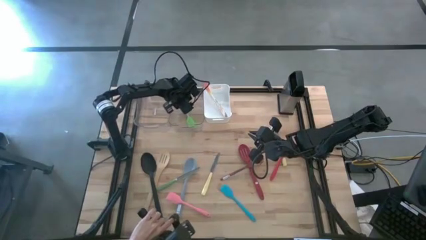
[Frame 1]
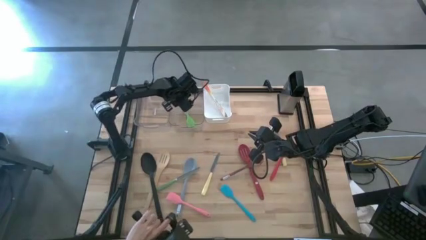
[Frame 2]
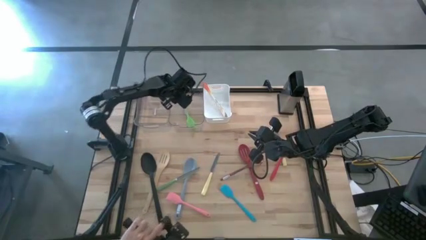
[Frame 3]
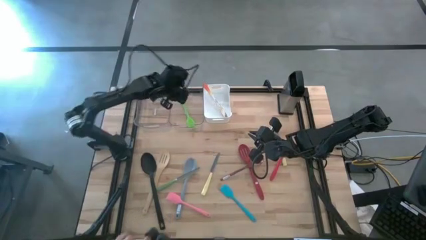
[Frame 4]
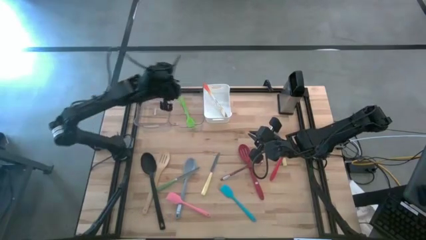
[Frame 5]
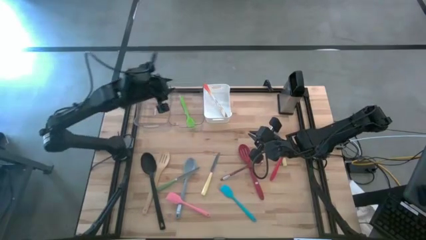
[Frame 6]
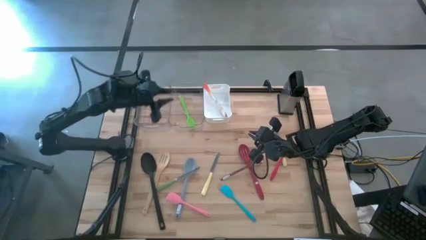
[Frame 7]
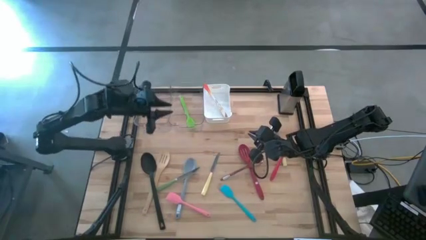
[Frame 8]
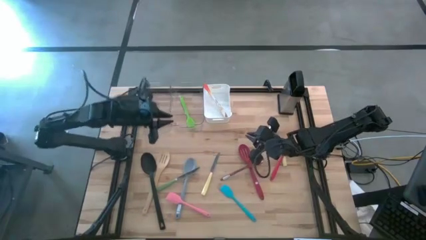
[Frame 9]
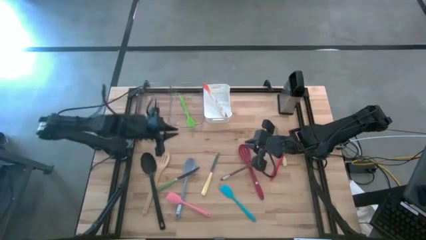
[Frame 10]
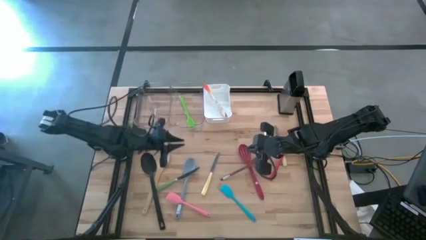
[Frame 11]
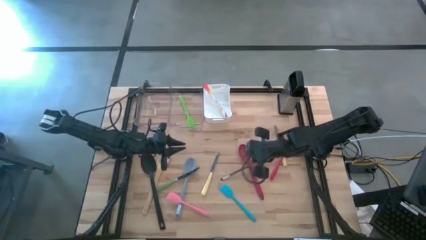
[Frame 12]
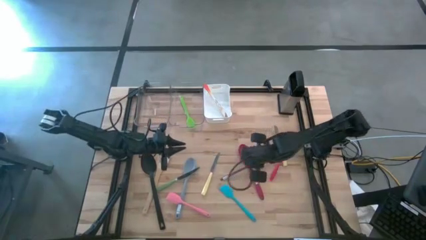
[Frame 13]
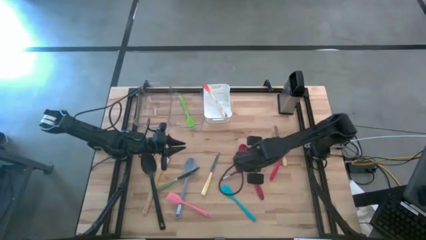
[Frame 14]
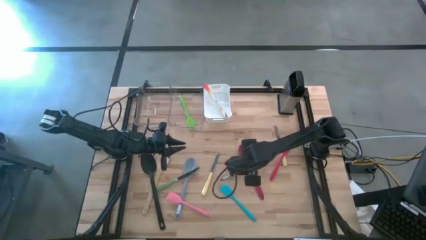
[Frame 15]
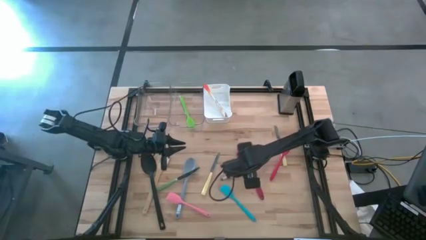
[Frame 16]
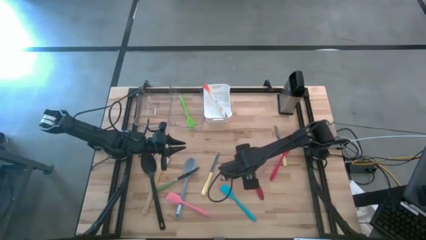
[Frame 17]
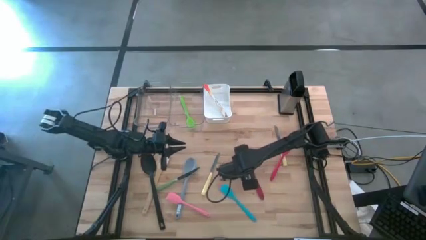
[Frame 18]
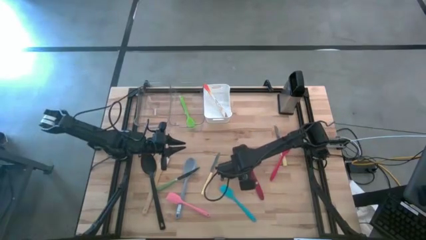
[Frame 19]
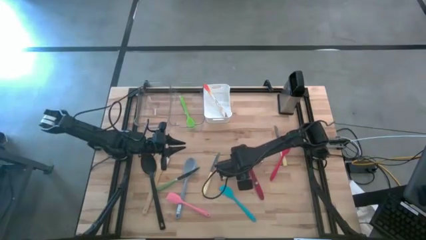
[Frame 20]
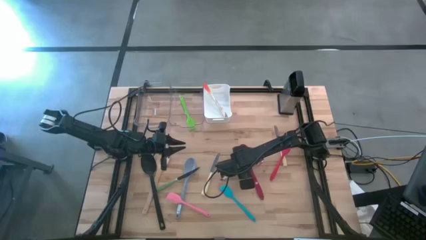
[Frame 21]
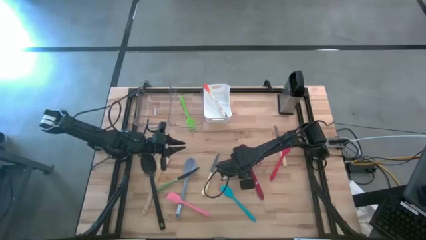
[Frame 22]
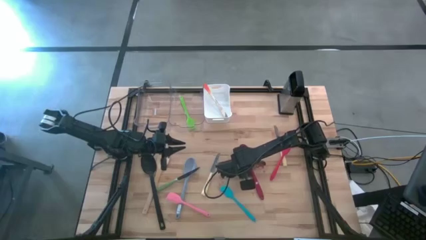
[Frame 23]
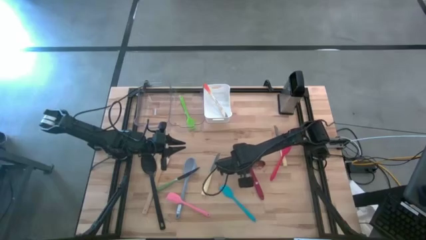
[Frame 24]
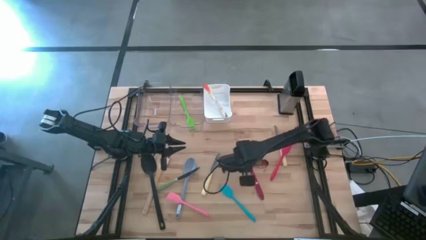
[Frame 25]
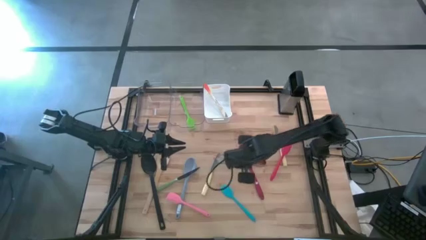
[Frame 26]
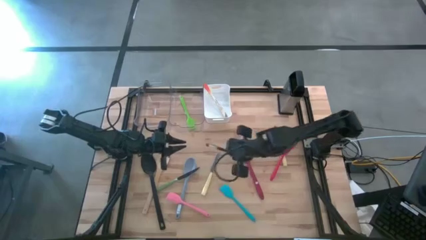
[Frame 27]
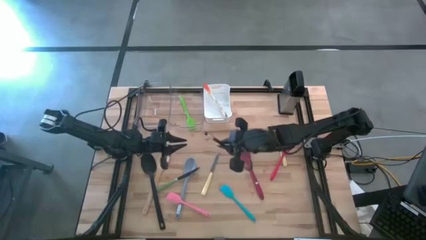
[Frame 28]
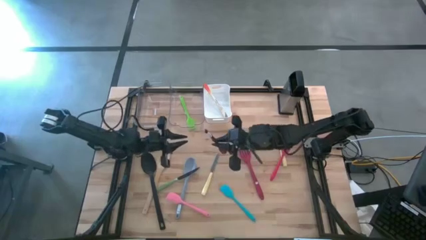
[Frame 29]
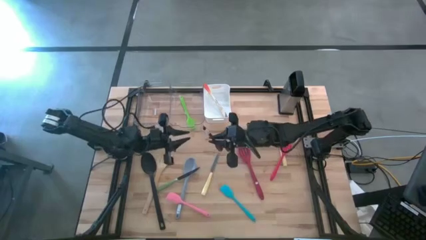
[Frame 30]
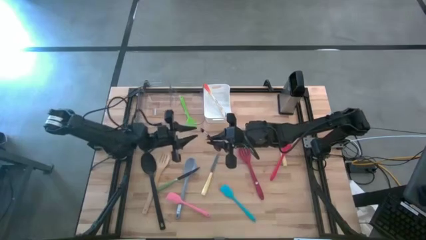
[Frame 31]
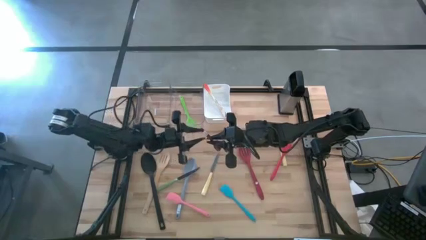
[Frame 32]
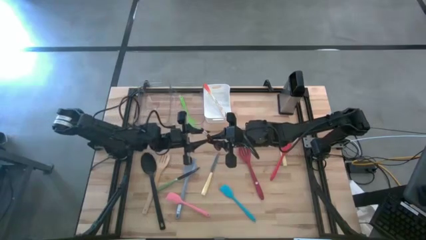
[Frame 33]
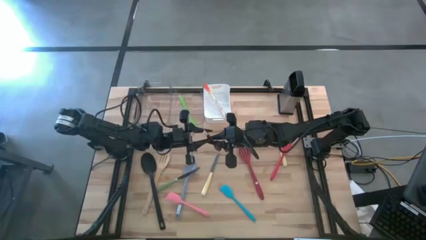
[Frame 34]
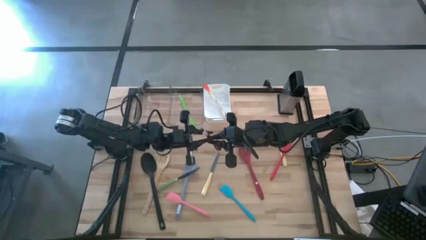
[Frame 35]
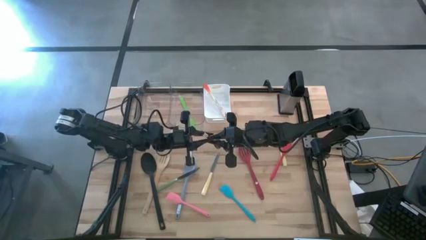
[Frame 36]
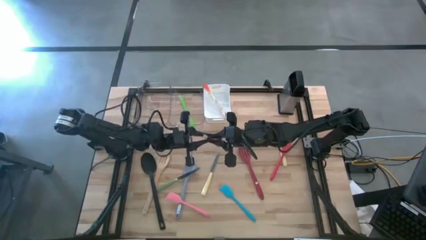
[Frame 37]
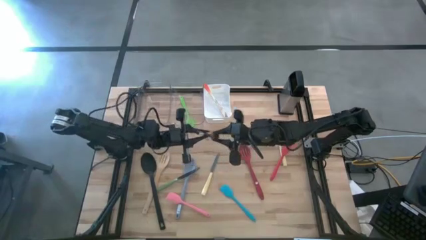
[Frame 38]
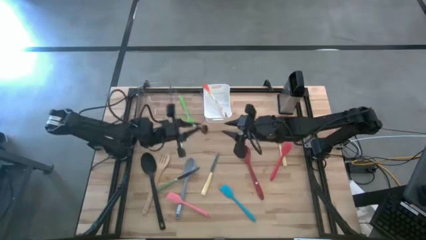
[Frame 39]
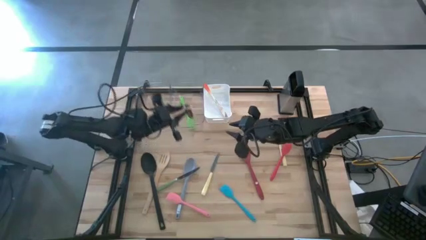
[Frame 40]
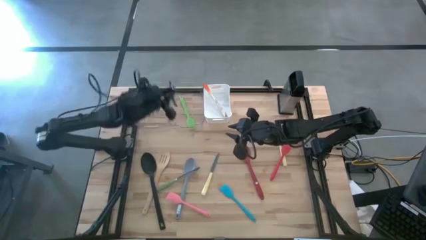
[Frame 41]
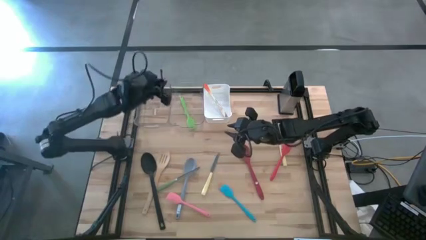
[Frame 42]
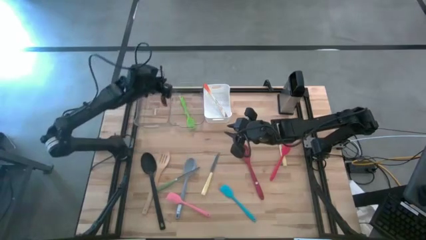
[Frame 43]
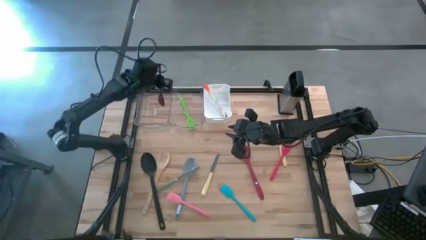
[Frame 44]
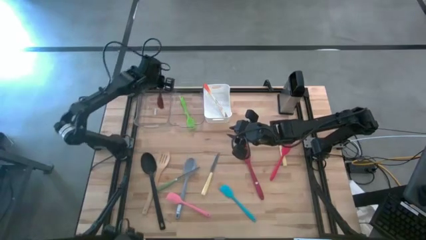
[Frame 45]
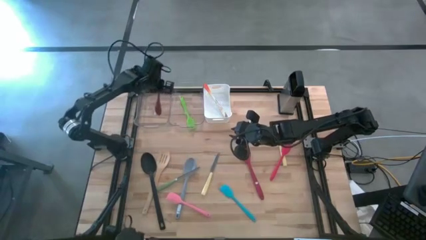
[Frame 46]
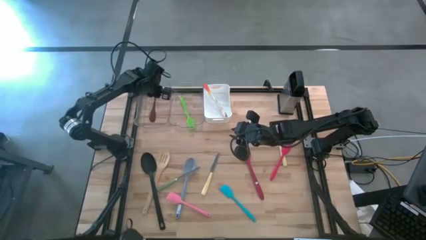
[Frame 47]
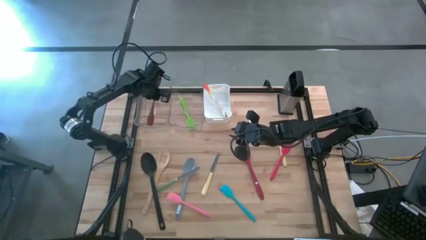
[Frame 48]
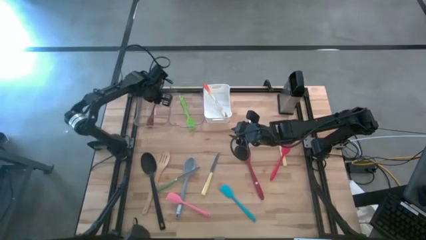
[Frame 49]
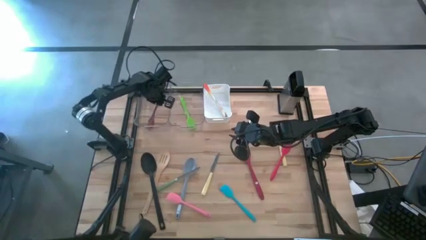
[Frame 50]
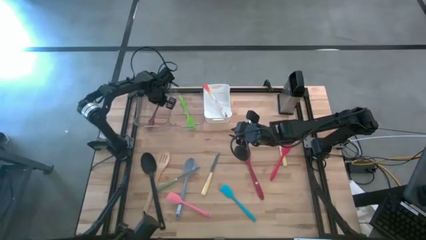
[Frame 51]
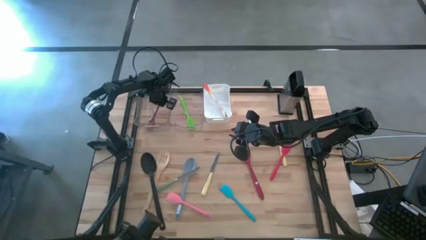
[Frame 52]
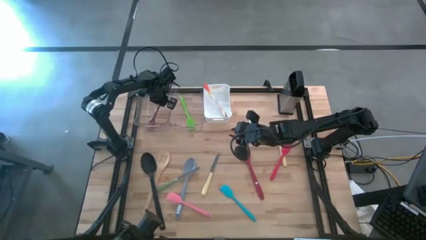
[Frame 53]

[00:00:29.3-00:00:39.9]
Task: Pick & Place Kitchen Items
Put the brown serving spoon into the left transparent bin

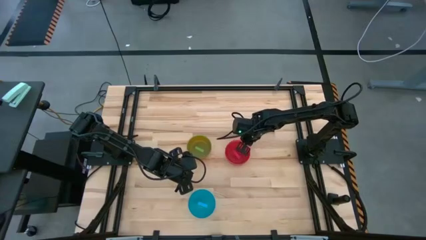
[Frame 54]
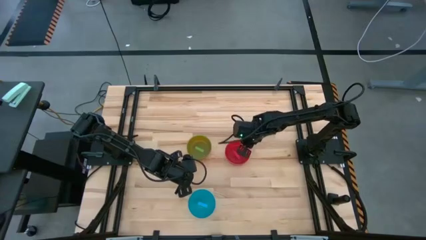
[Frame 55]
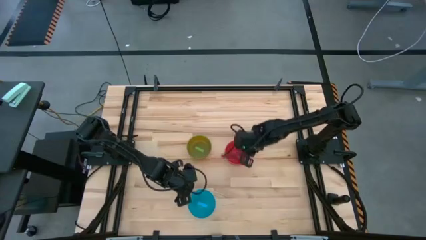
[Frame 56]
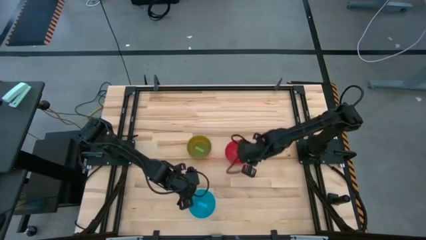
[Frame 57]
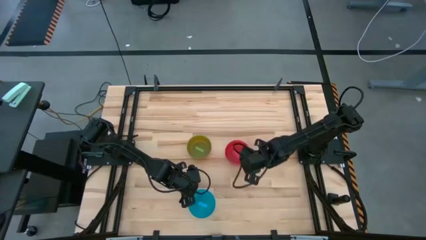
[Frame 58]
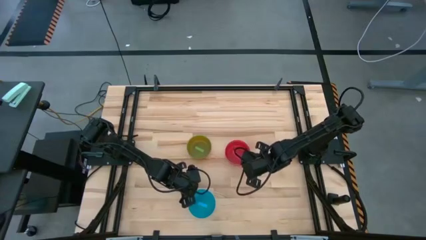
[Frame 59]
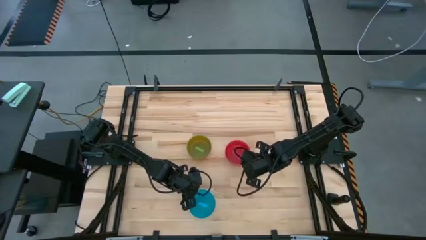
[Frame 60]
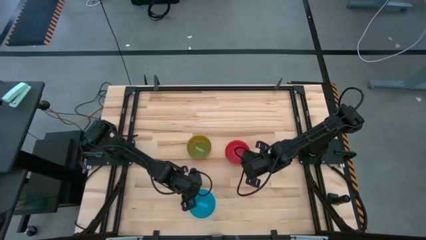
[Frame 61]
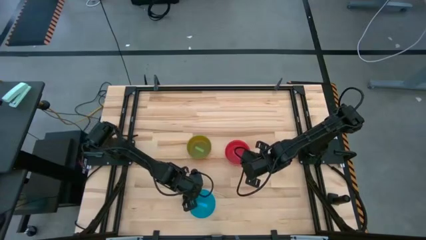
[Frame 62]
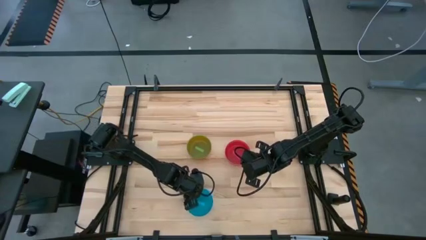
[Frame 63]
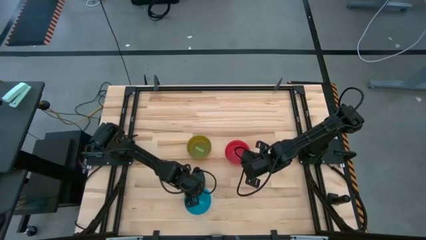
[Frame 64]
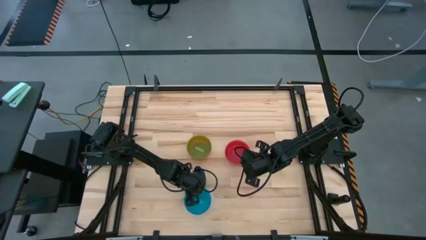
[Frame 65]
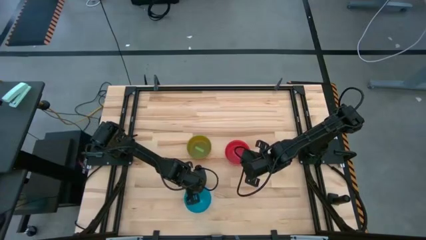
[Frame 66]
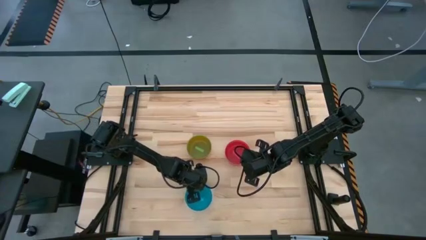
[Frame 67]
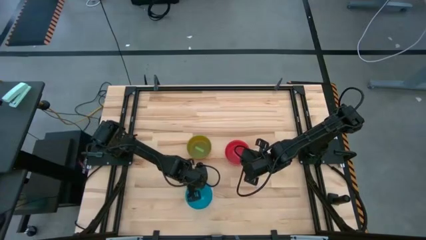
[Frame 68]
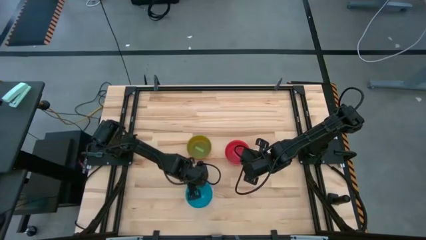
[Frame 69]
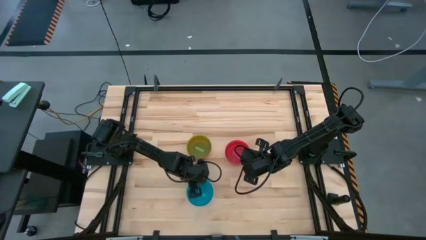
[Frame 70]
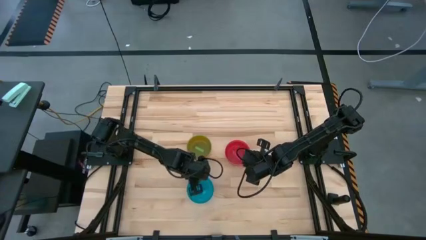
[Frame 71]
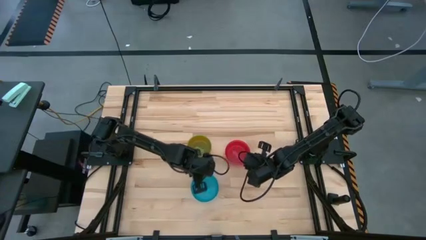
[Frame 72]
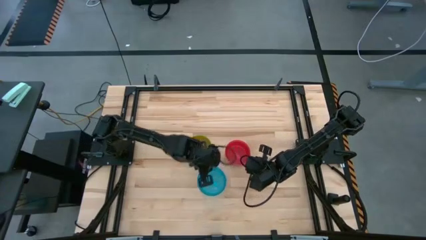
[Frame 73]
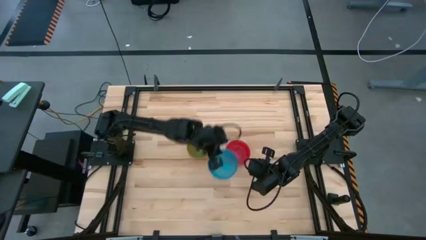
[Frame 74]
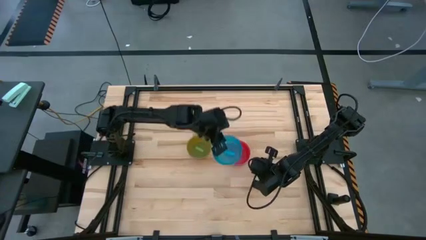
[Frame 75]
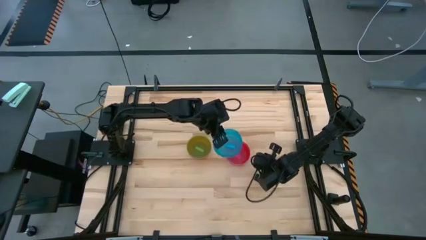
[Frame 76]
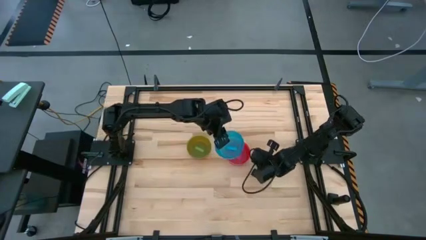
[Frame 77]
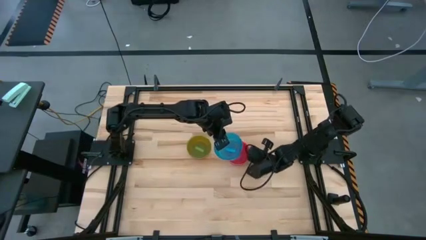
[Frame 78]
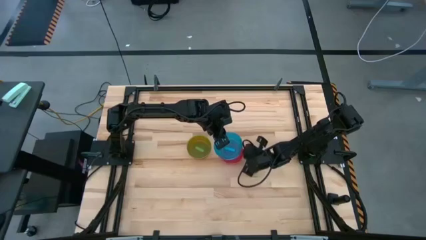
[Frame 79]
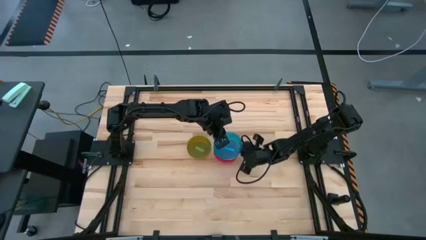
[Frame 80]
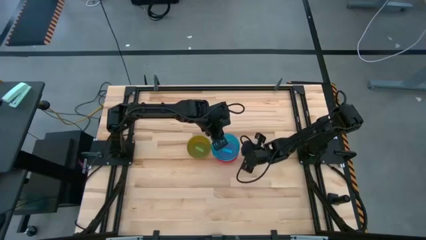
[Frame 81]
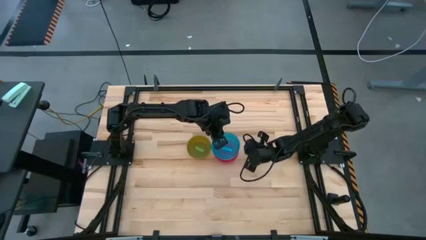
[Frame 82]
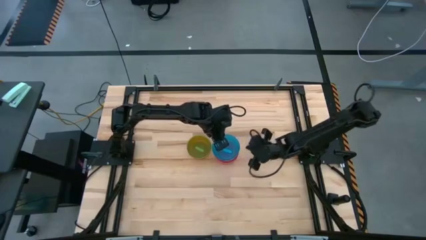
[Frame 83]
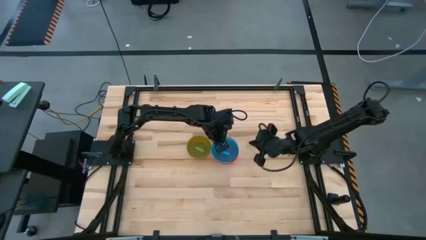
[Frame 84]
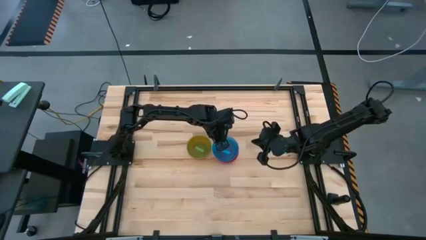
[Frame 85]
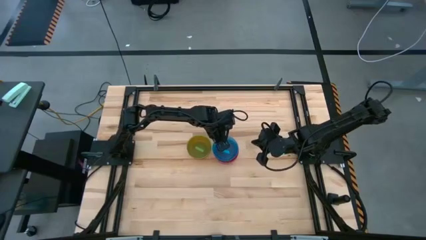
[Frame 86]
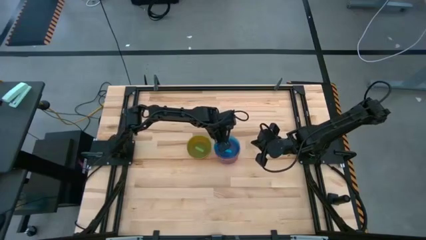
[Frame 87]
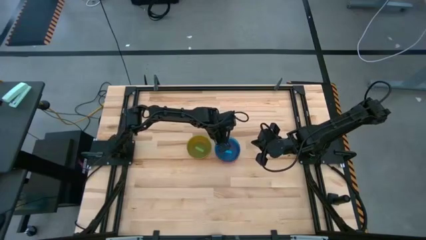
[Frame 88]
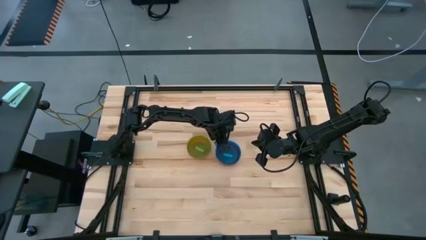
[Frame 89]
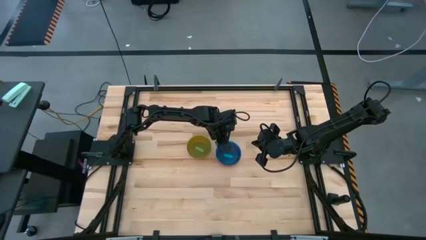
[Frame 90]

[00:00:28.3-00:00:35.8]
Task: Nest bowls inside each other
Stack the blue bowl on the pink bowl
